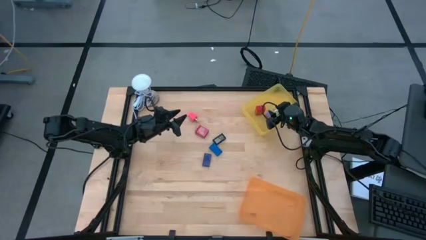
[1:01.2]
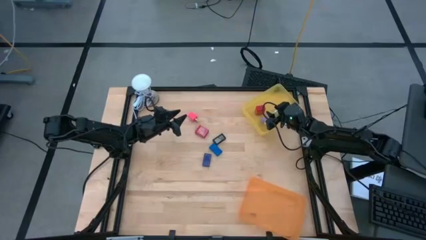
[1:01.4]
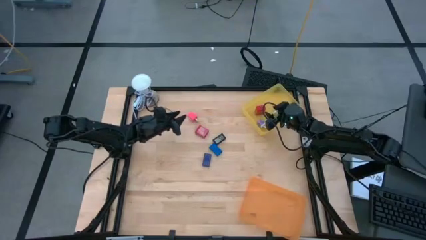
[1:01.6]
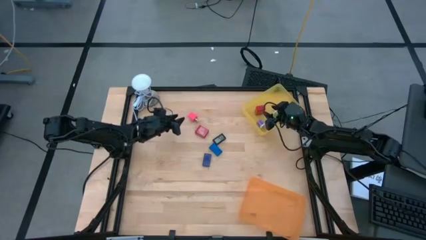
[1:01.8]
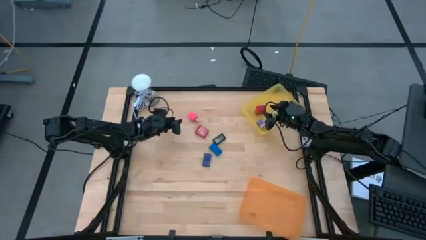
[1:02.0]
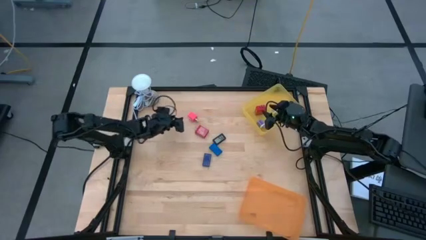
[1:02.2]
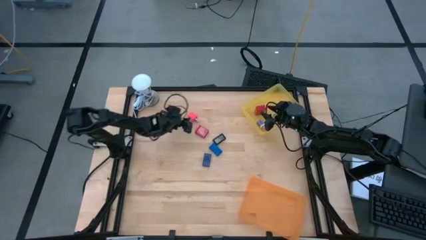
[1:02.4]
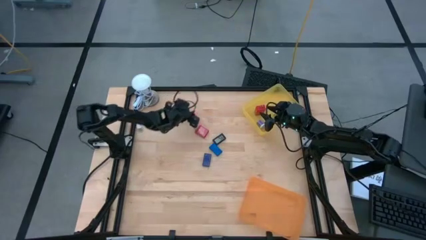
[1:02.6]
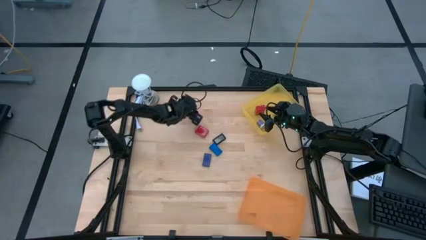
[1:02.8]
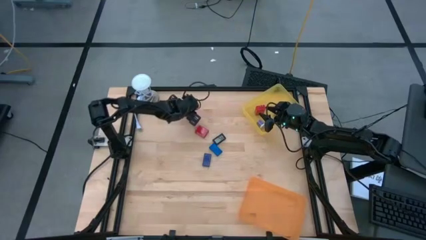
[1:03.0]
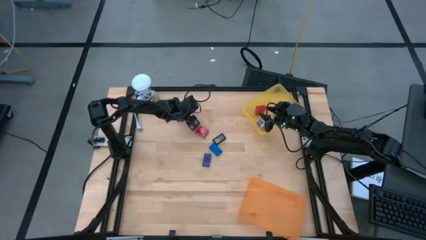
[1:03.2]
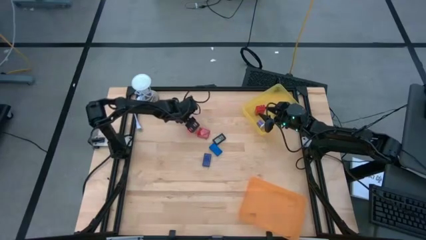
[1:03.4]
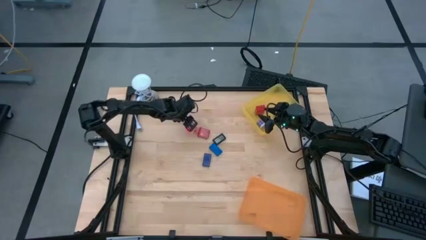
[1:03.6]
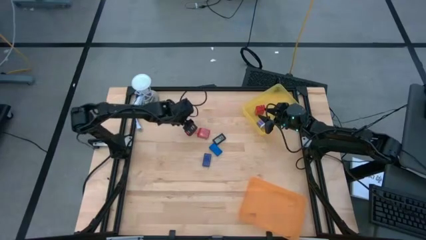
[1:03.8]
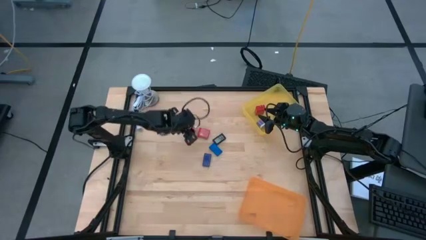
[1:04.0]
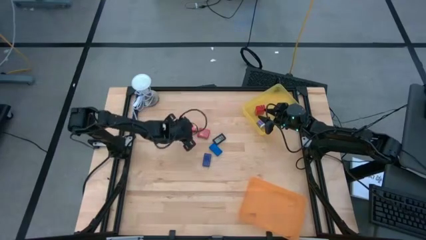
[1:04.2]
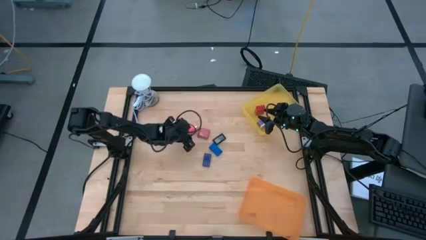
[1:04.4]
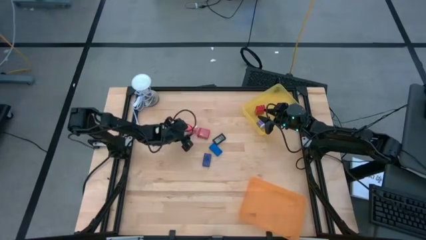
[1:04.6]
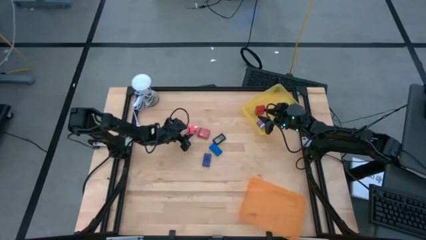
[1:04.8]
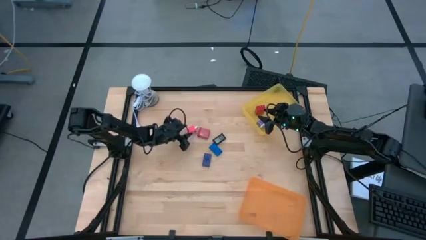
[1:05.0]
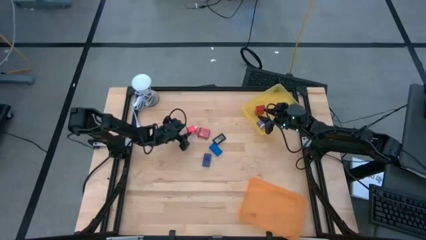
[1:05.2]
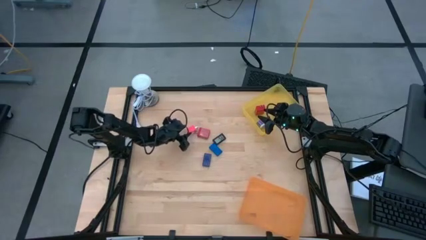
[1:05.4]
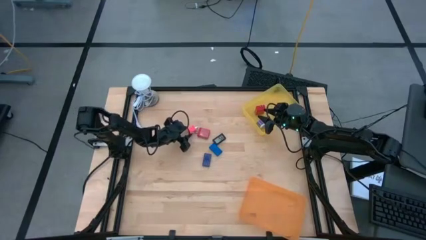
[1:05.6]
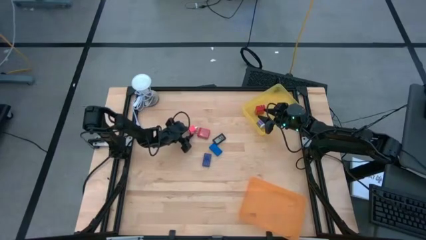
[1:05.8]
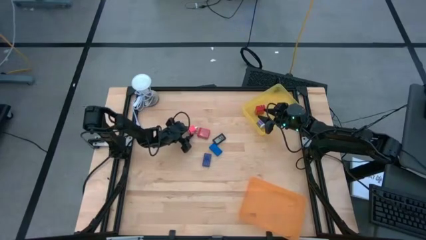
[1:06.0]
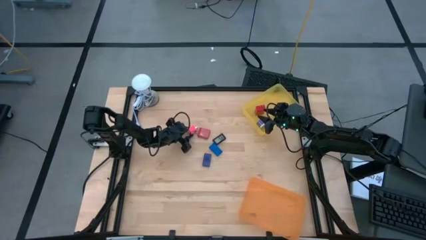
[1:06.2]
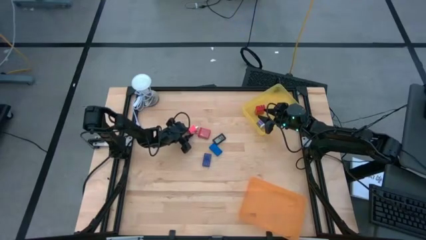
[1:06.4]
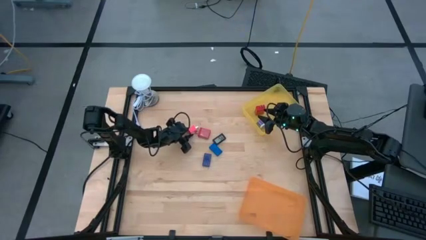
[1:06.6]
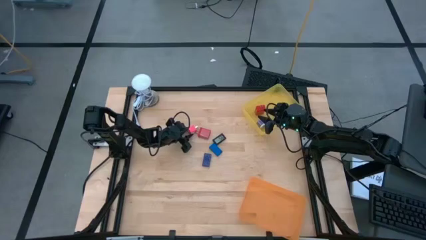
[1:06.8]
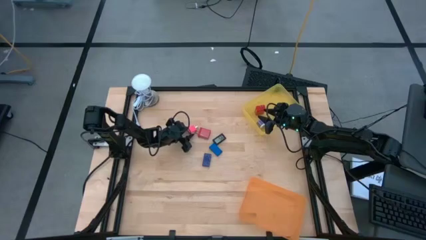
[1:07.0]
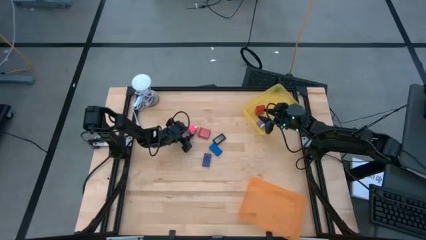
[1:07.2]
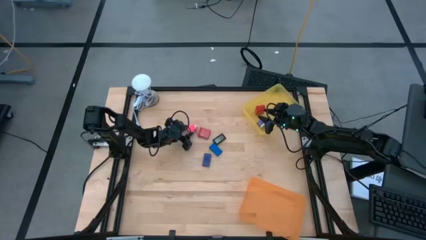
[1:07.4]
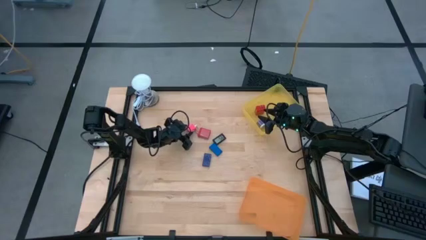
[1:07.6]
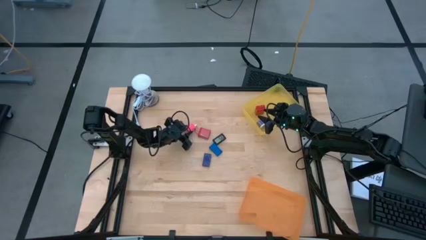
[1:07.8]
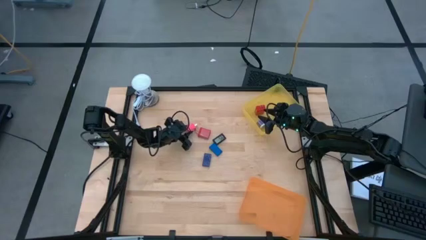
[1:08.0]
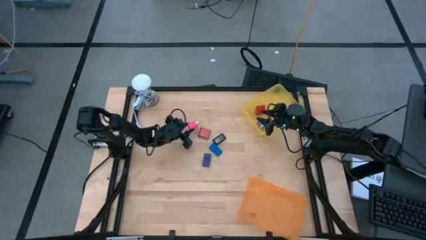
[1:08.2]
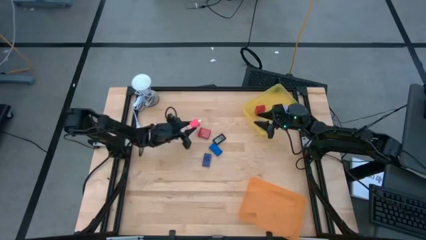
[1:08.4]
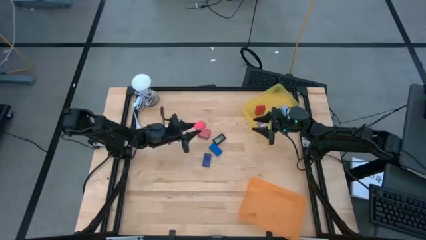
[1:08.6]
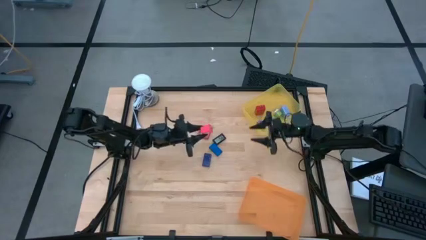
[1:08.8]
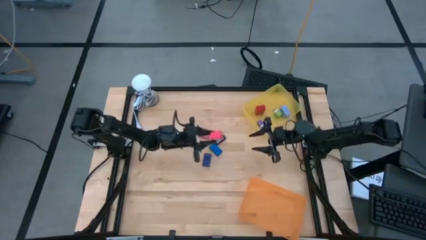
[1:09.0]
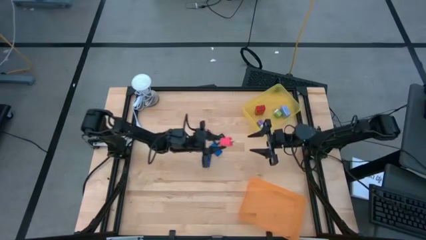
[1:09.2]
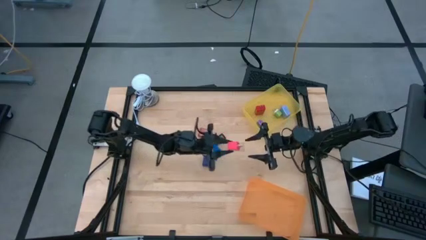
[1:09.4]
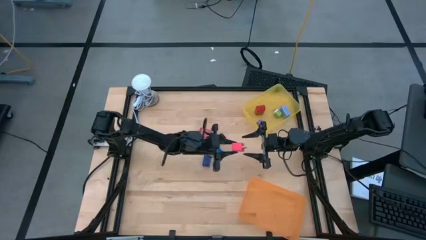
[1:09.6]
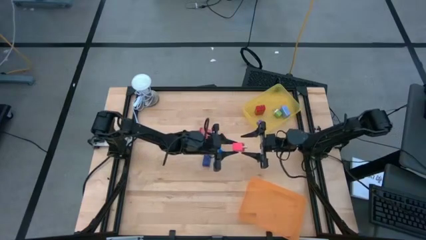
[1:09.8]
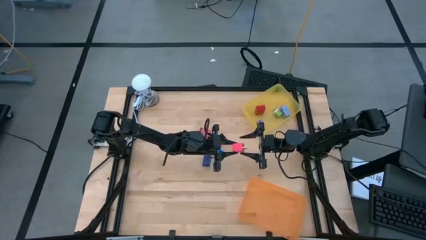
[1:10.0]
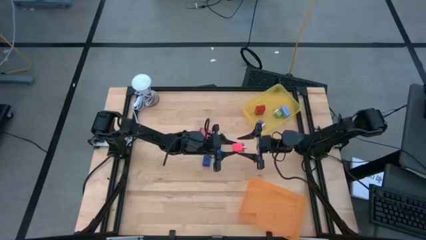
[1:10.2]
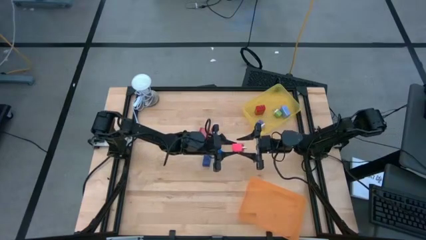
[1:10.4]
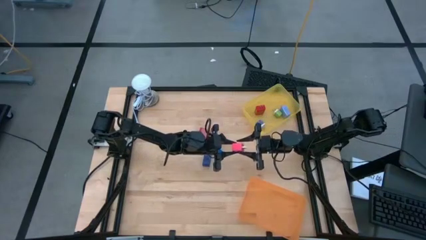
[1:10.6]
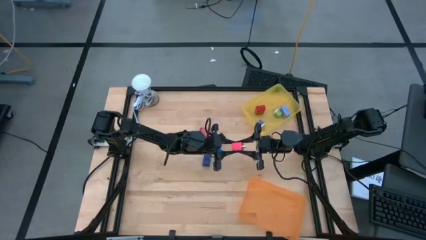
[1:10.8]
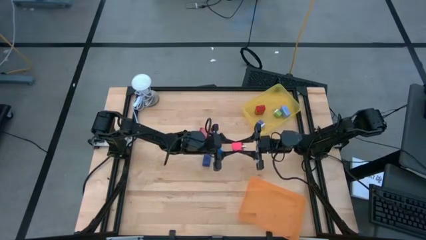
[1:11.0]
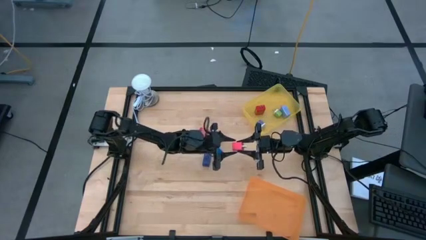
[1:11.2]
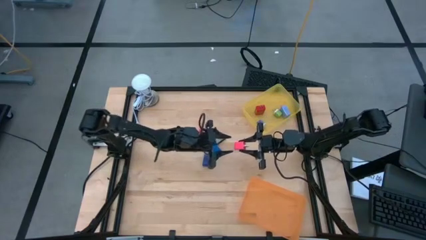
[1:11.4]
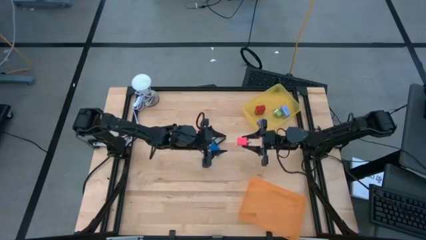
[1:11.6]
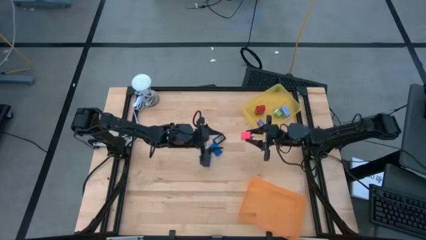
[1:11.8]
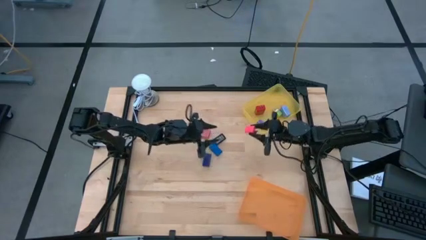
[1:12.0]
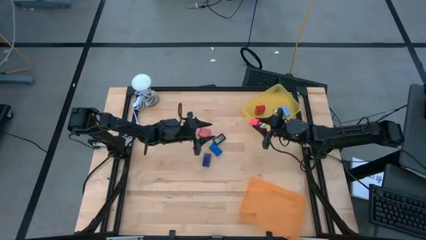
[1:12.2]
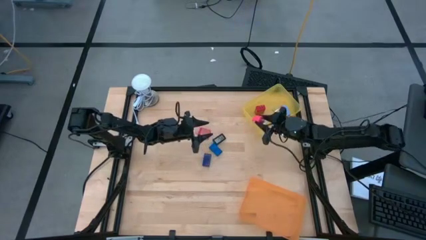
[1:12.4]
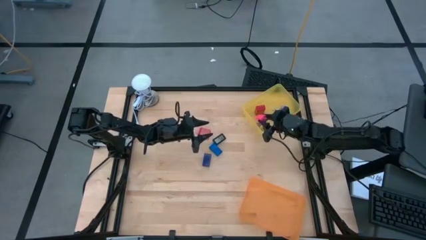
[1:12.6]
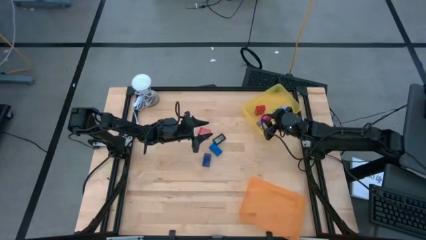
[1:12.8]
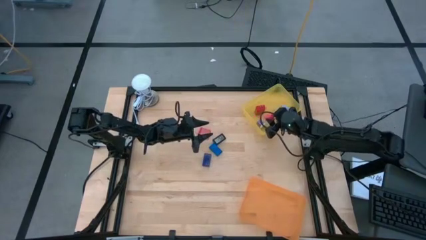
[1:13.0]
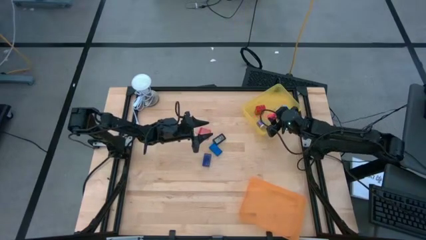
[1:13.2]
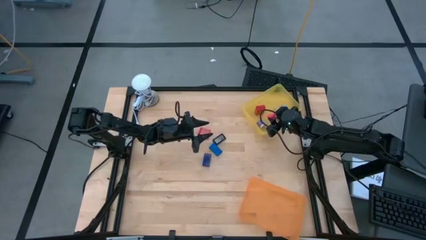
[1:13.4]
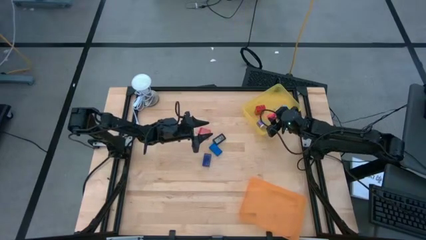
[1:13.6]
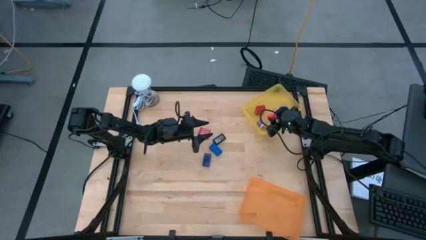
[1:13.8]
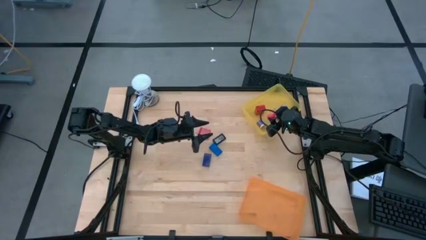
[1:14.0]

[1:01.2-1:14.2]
Task: Pick & Place Office items
Put the pink charger adapter into the yellow bin
